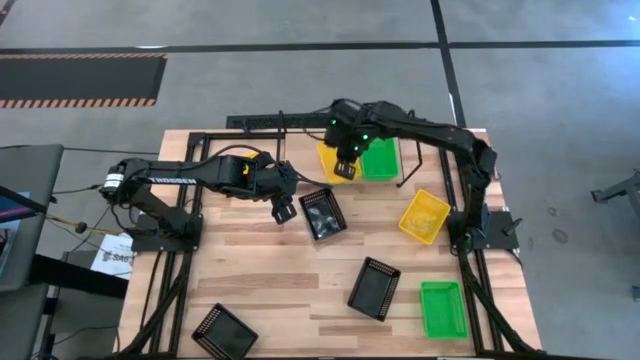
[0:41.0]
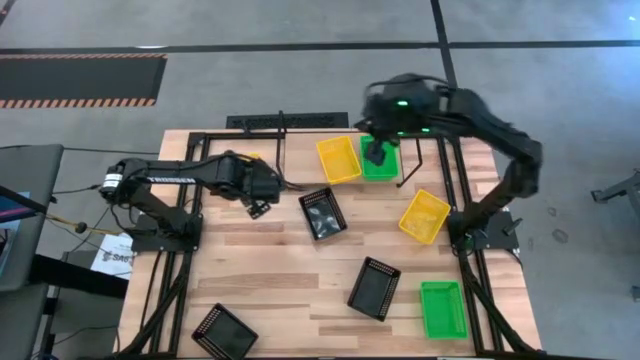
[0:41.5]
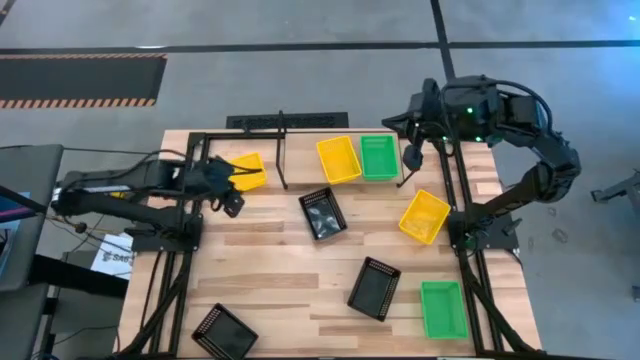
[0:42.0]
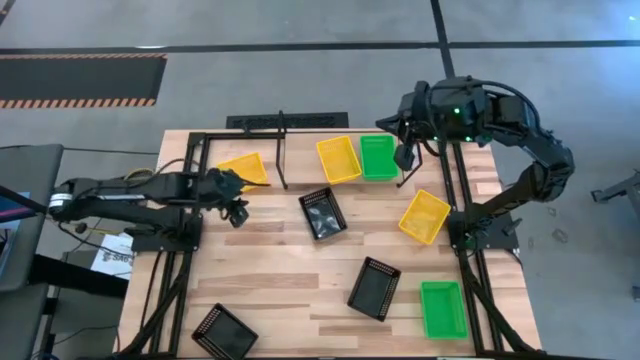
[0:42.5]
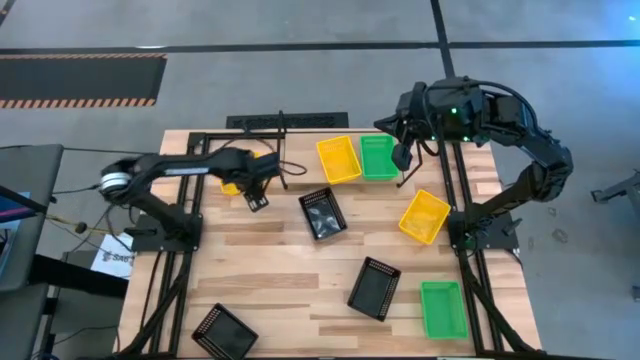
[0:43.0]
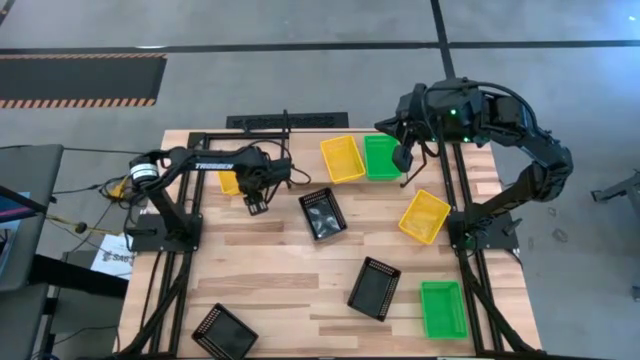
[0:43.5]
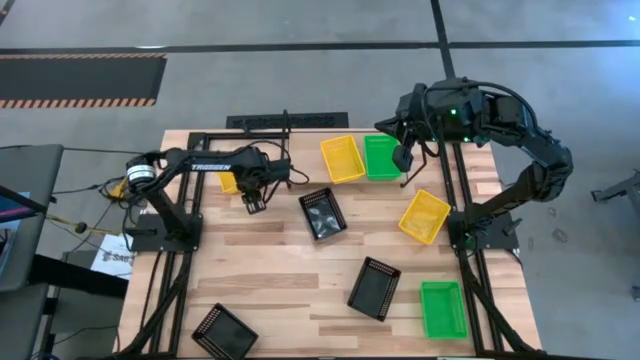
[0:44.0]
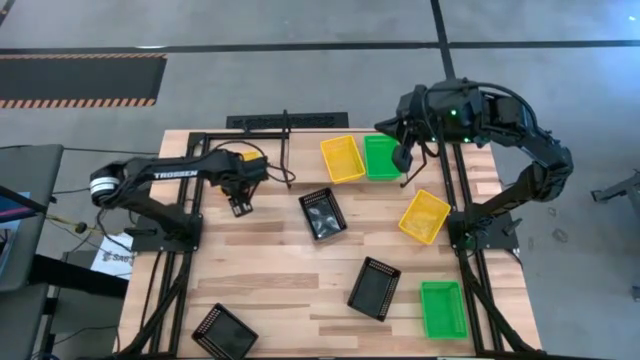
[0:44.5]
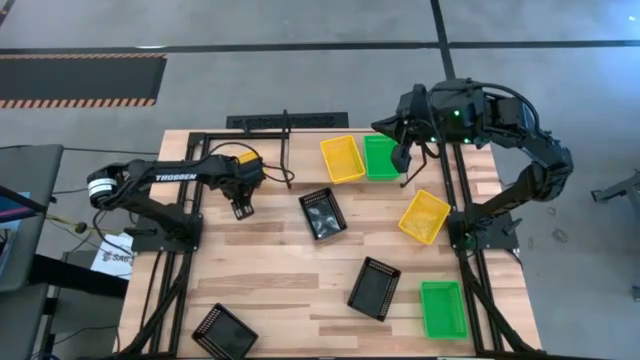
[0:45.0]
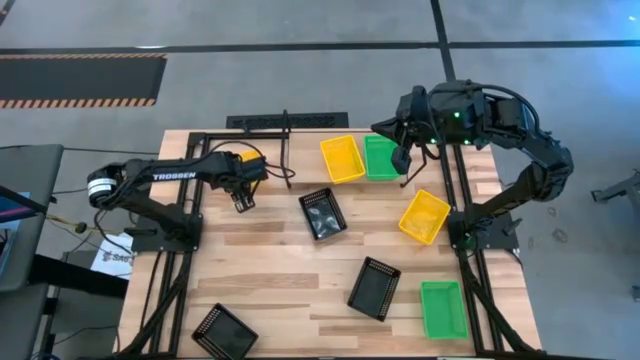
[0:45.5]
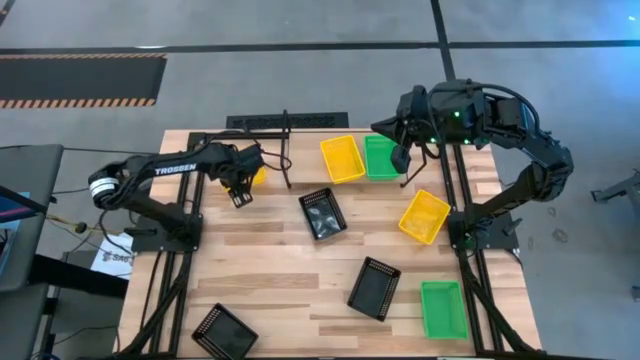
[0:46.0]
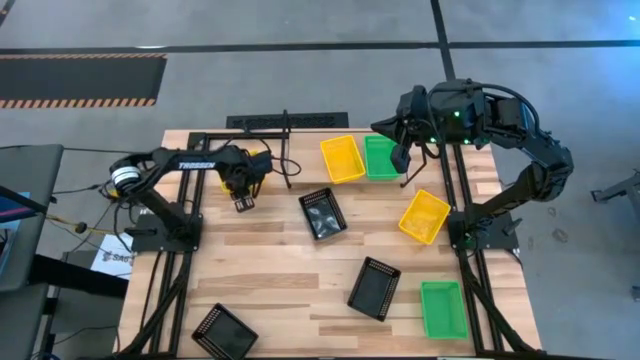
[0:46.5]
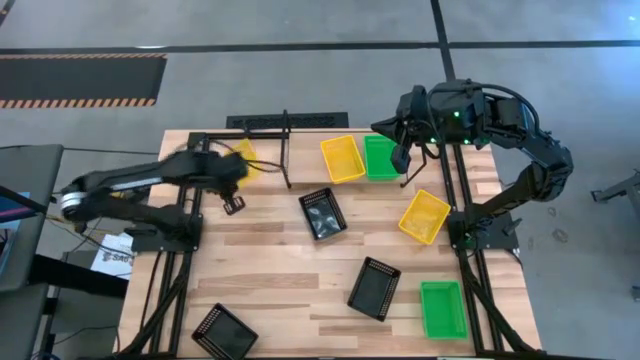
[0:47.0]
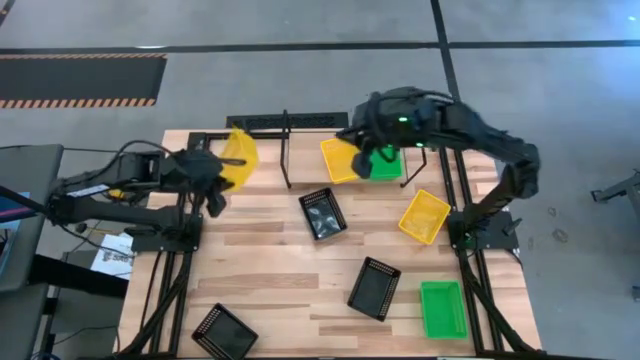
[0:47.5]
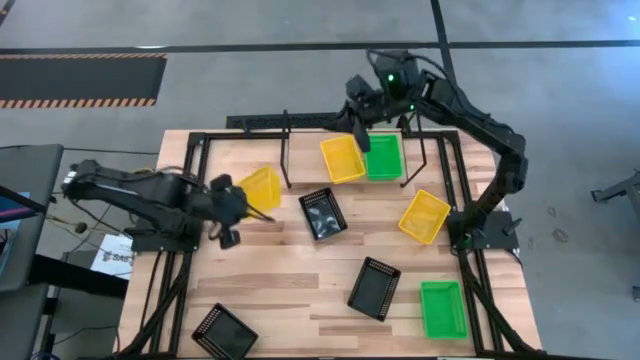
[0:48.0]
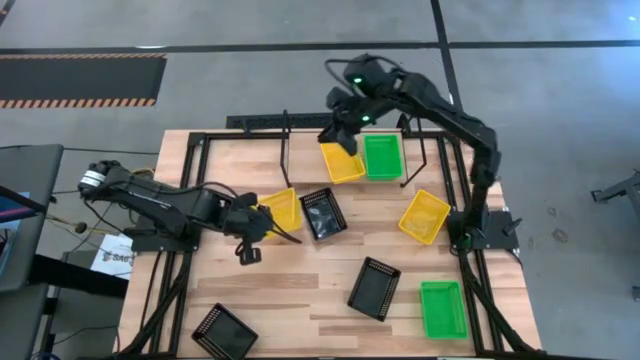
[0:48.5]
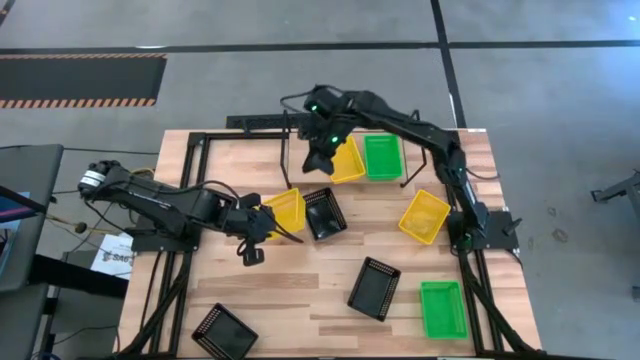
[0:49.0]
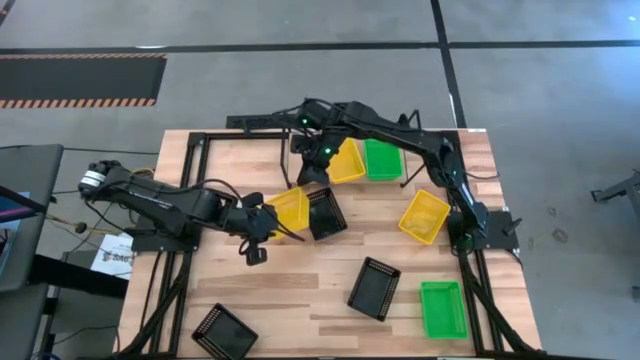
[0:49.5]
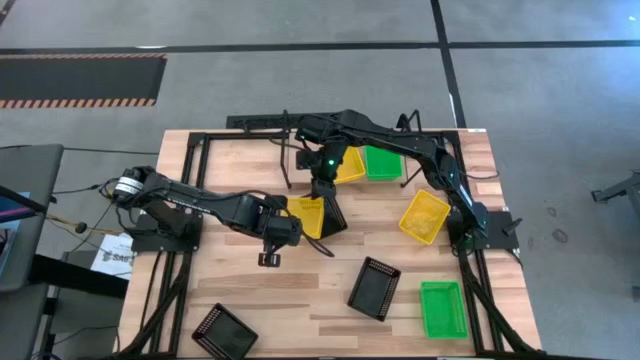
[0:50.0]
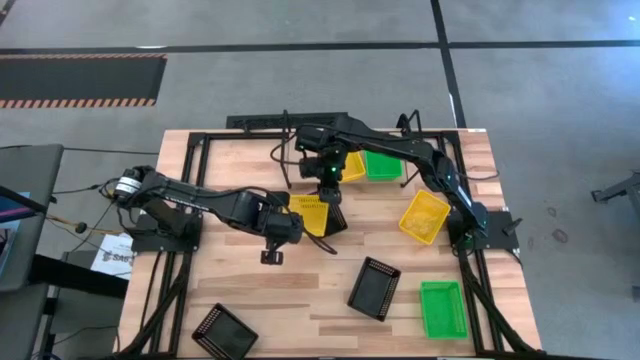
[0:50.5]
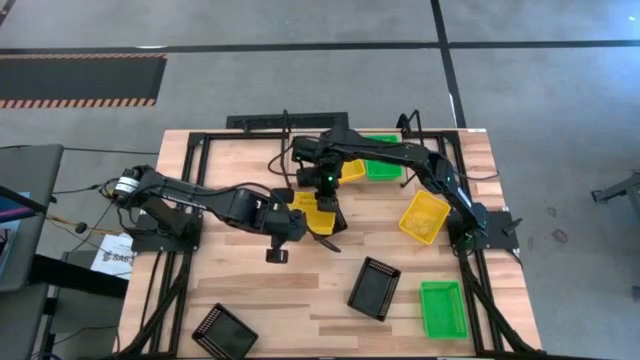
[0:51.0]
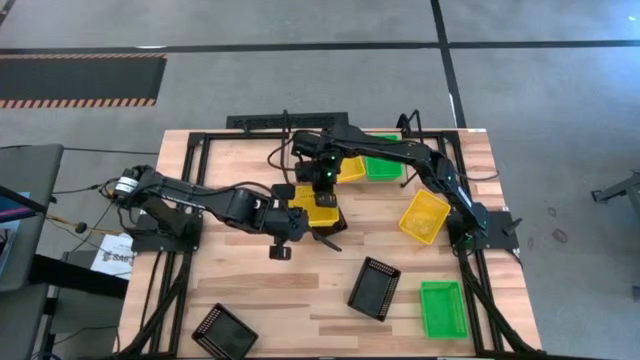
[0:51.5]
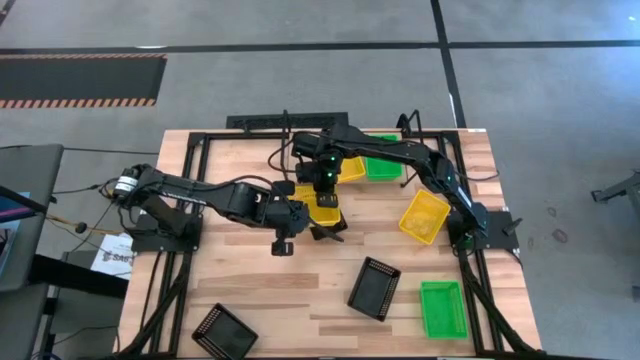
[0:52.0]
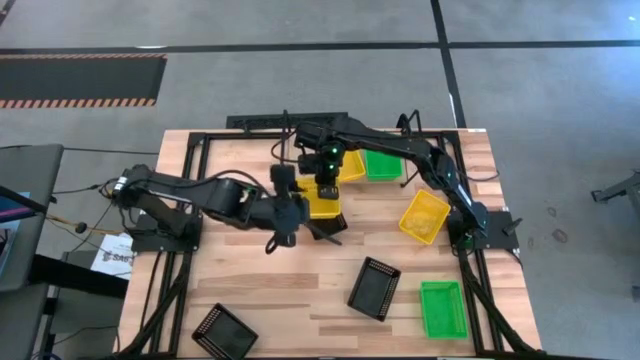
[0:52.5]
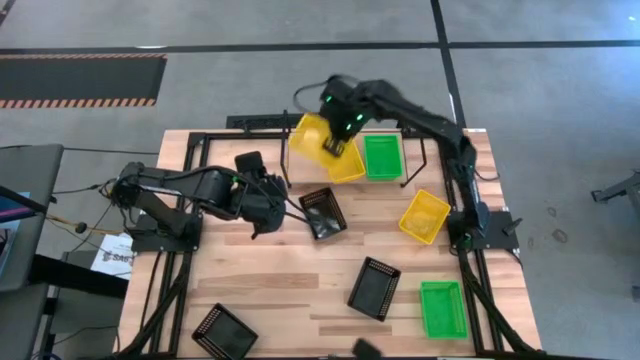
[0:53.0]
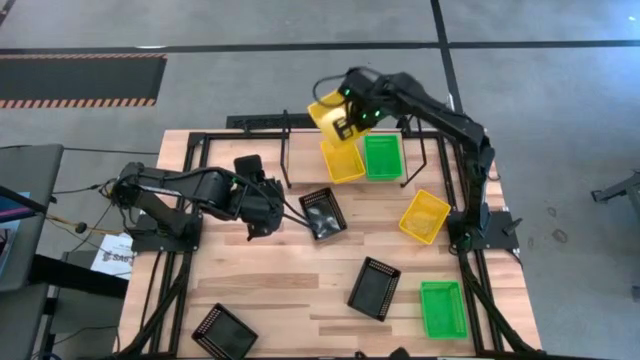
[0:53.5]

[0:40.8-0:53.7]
Task: Stack baskets on shelf by color
Stack the left yellow bin on top of the yellow bin on the shelf
